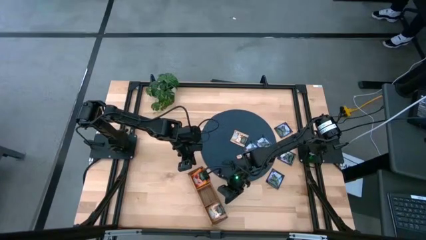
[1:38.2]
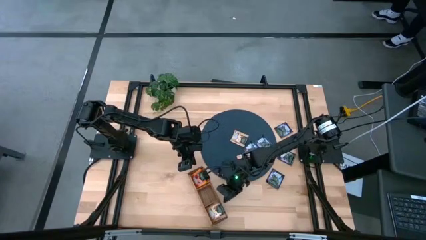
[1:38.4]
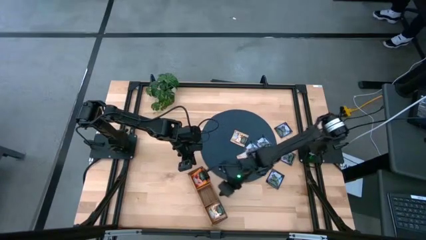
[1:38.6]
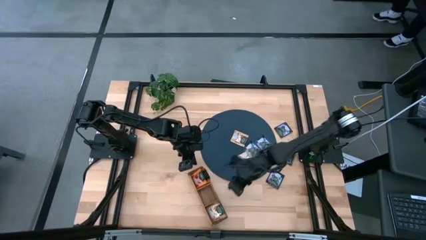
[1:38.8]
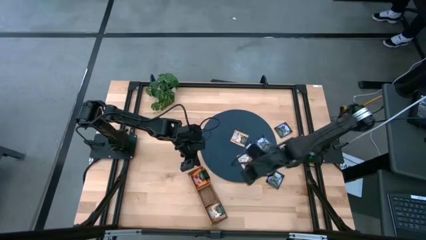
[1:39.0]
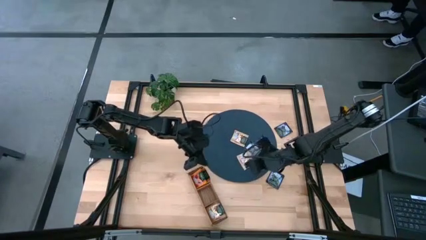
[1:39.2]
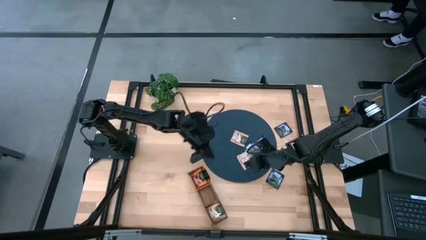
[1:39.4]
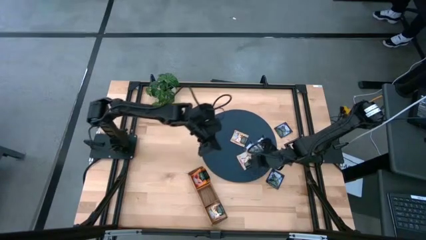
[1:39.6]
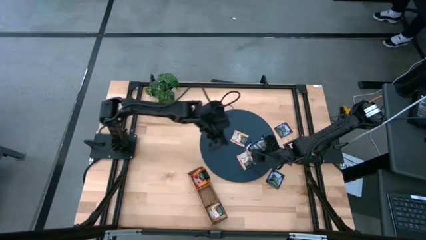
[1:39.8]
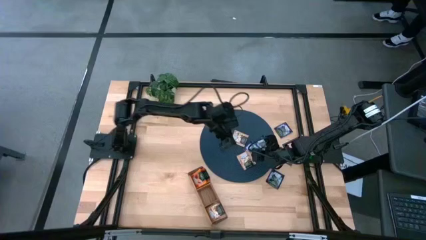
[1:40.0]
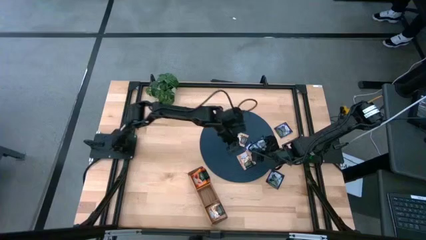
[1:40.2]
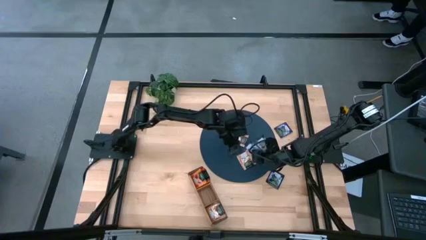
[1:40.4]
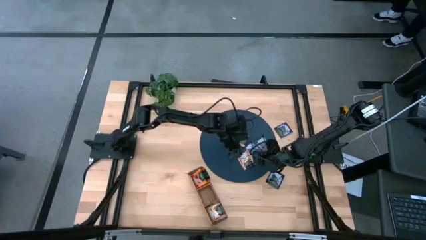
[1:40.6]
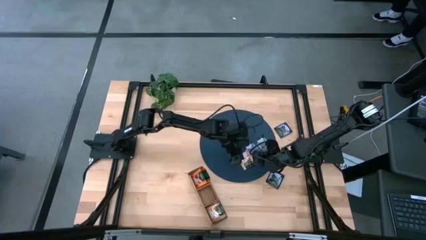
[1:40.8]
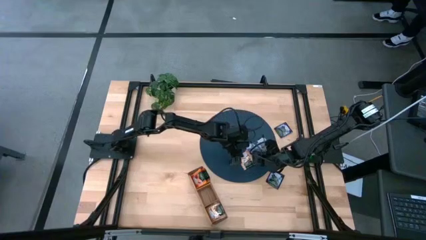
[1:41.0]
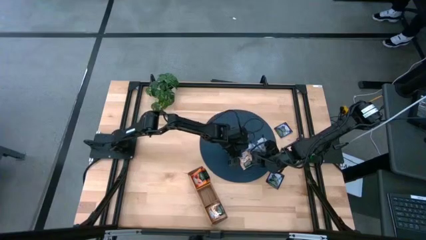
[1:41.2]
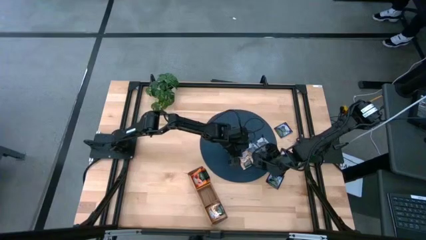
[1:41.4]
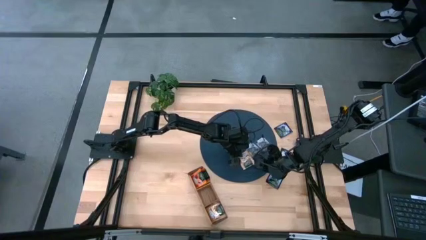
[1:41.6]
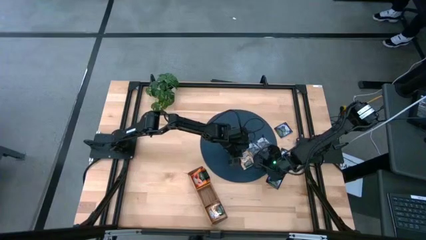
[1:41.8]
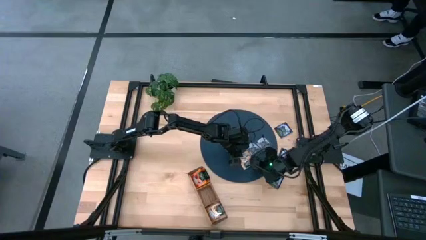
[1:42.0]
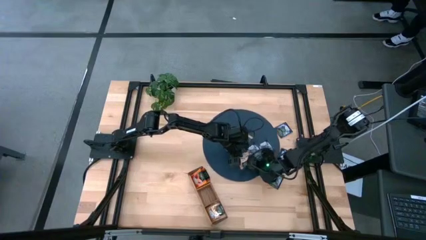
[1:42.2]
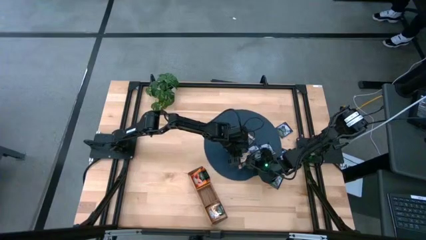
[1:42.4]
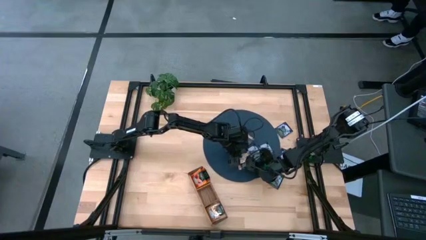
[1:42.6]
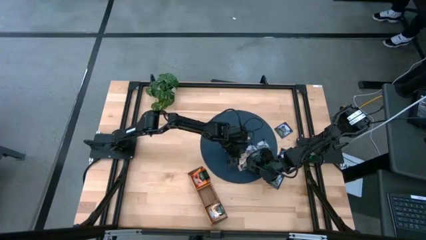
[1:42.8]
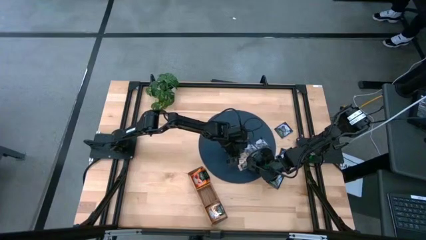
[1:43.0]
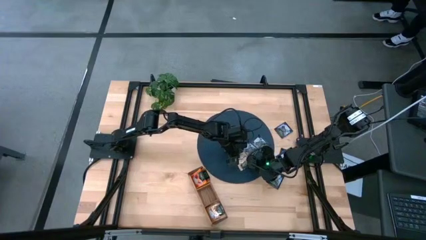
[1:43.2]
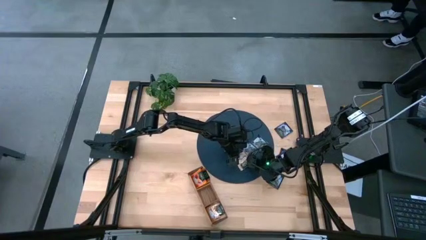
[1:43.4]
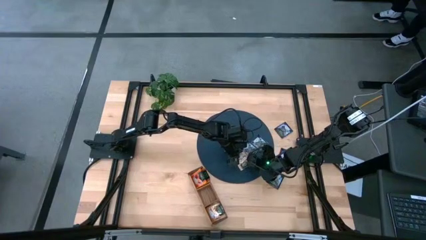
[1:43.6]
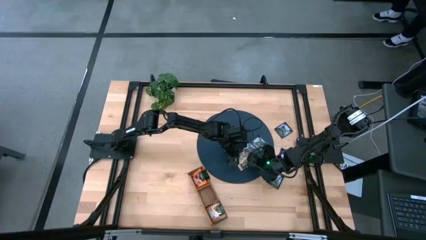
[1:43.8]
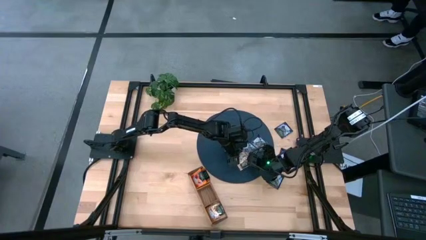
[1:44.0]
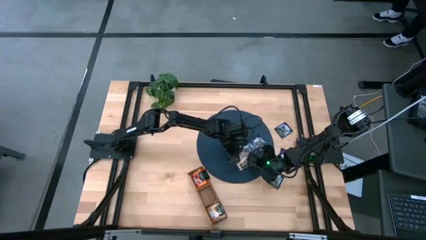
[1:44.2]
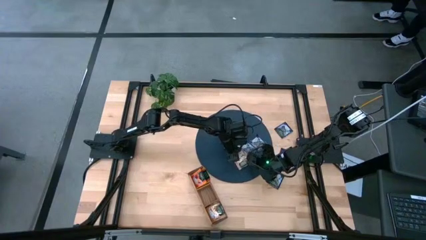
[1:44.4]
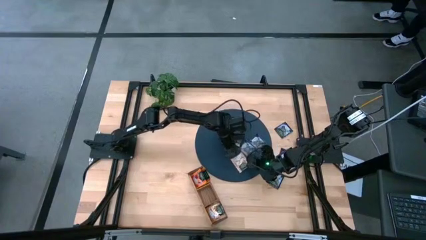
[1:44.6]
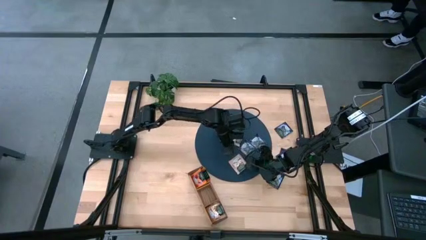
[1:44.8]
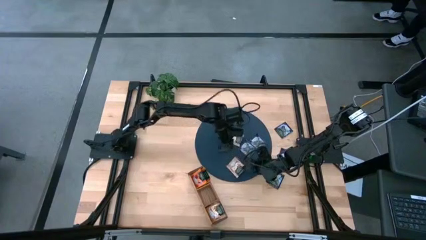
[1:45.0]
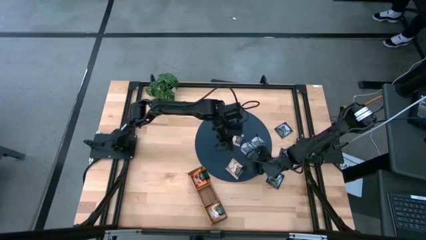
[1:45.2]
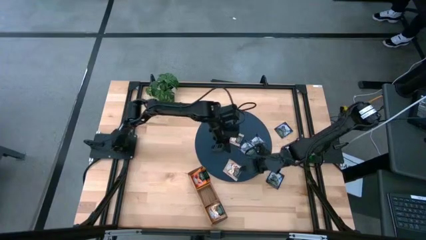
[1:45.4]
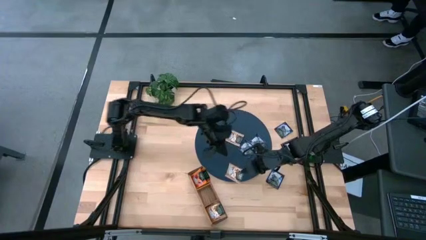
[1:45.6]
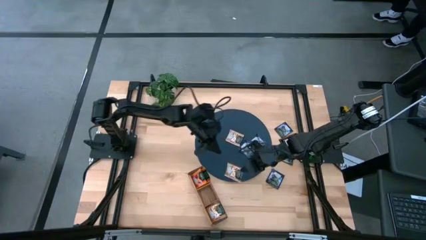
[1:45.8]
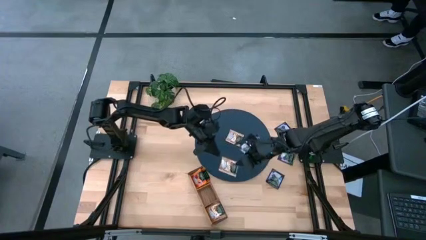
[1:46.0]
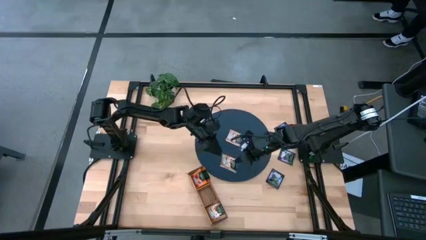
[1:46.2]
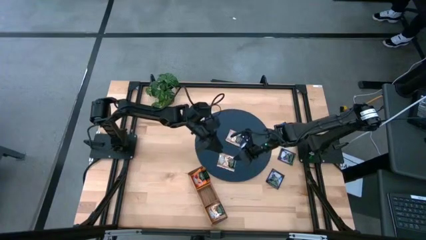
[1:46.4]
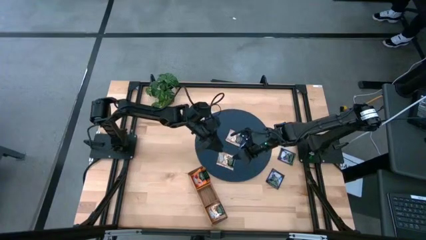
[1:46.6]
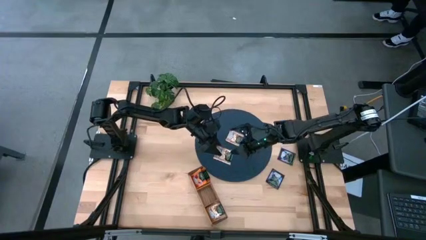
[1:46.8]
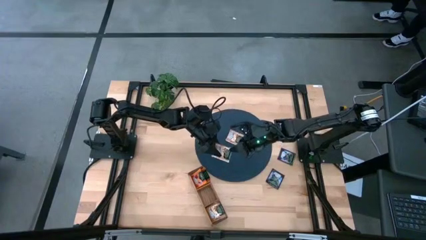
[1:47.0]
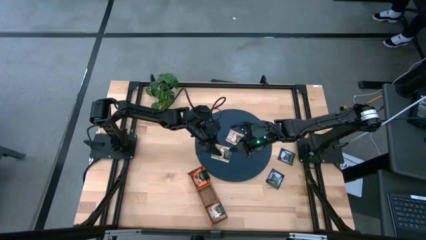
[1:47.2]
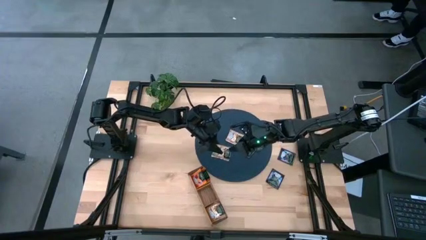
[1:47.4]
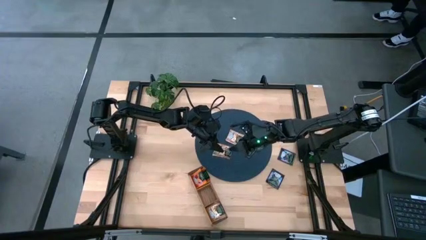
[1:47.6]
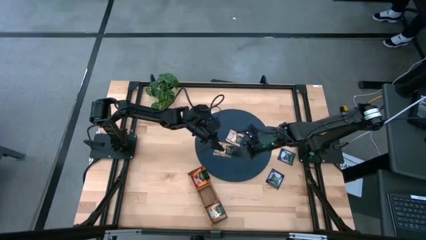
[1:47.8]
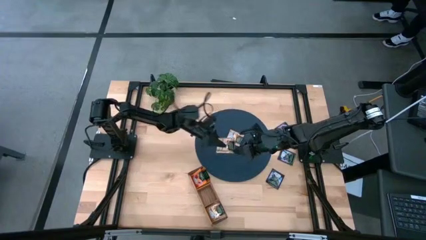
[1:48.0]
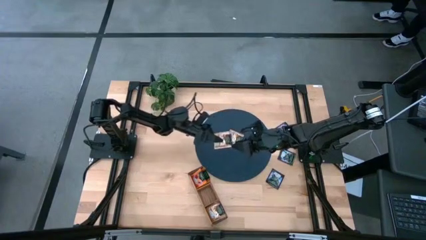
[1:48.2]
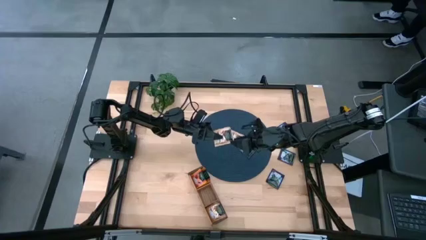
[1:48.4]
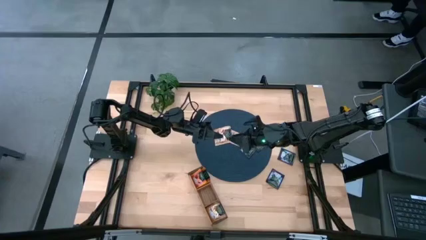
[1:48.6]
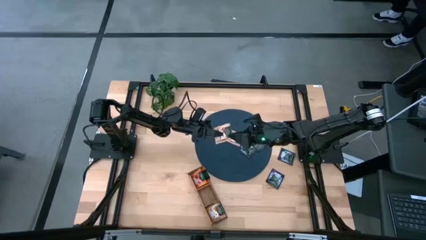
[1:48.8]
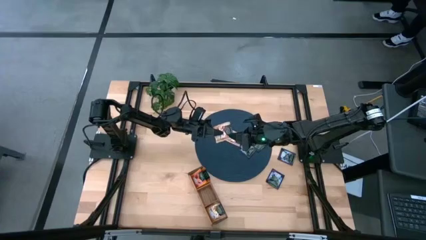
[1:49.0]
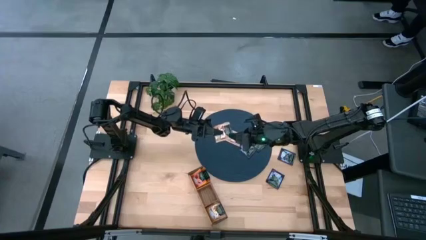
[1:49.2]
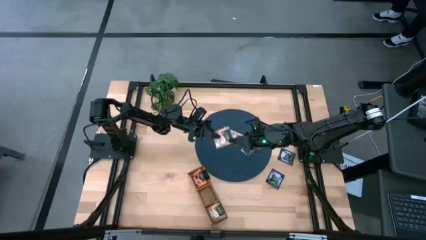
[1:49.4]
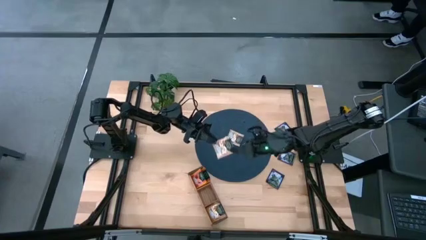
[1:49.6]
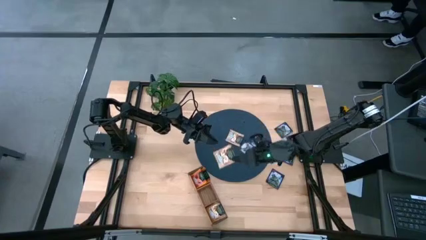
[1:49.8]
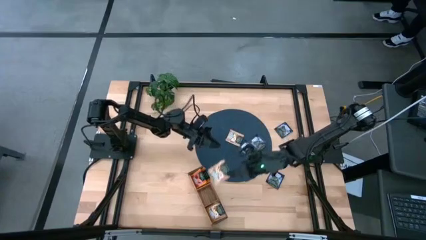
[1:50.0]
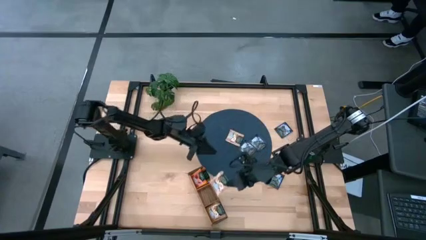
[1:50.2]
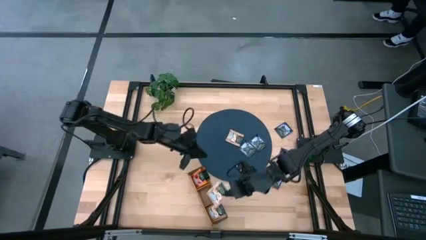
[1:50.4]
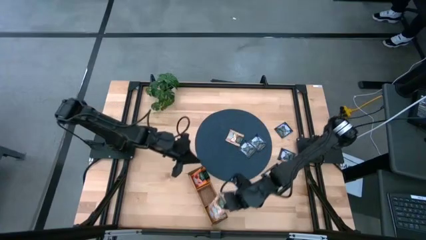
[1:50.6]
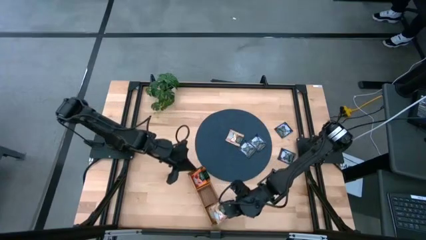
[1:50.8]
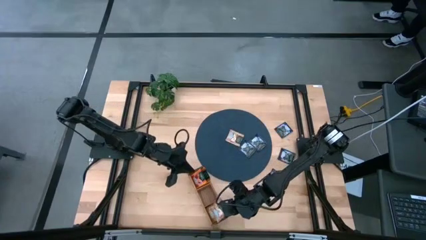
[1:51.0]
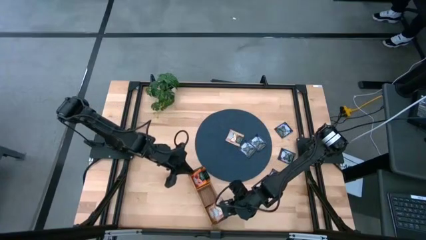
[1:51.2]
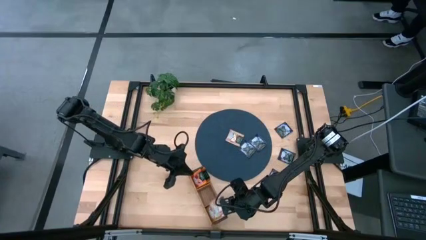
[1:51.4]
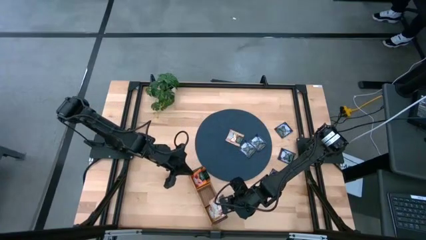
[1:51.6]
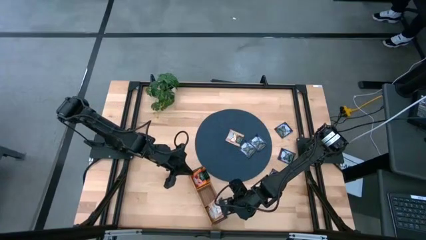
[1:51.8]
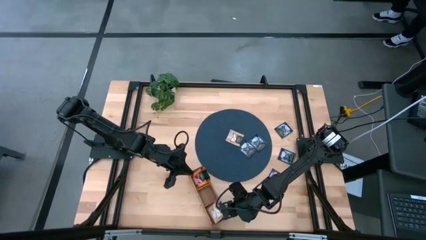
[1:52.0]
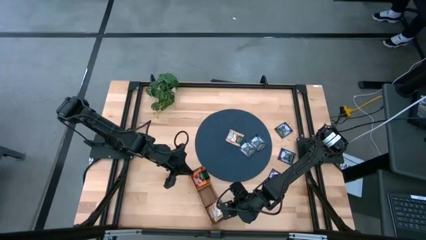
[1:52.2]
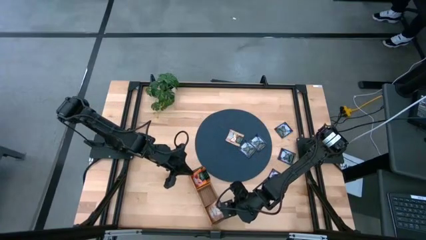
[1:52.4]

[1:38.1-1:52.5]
Task: Pick & Place Tea
Put the brown tea bag into the right section of the wooden organizer
